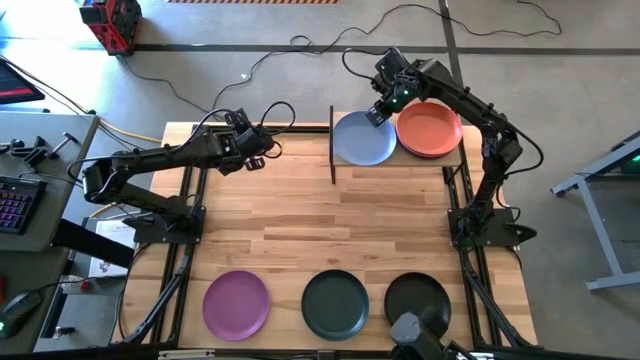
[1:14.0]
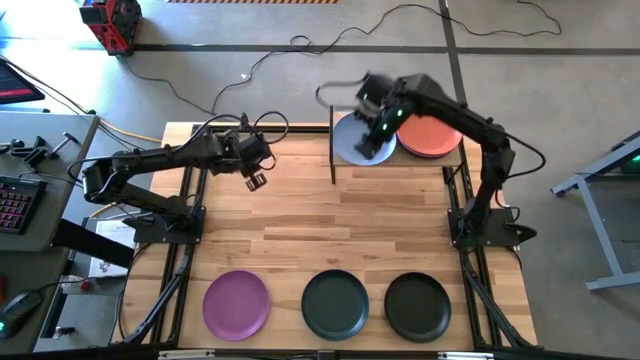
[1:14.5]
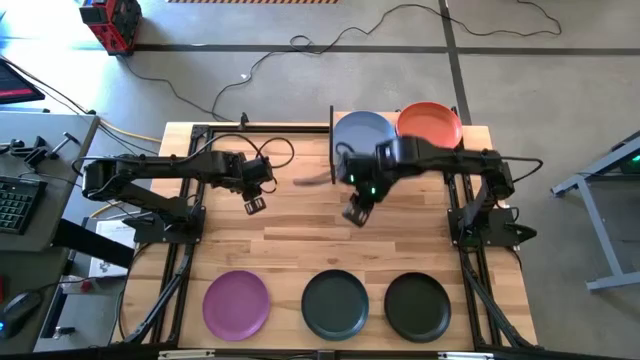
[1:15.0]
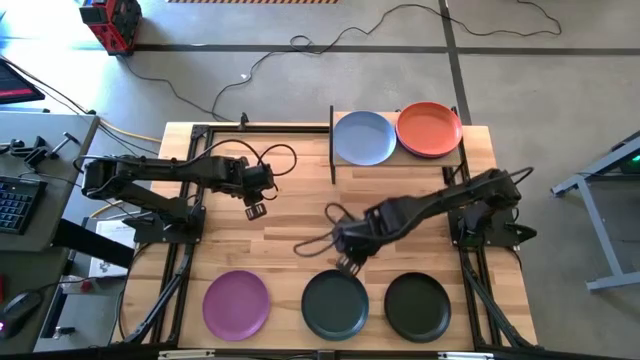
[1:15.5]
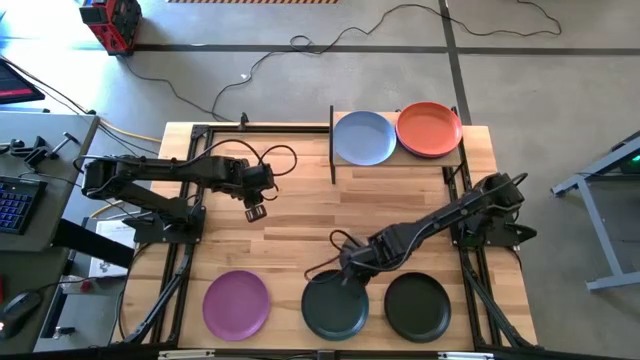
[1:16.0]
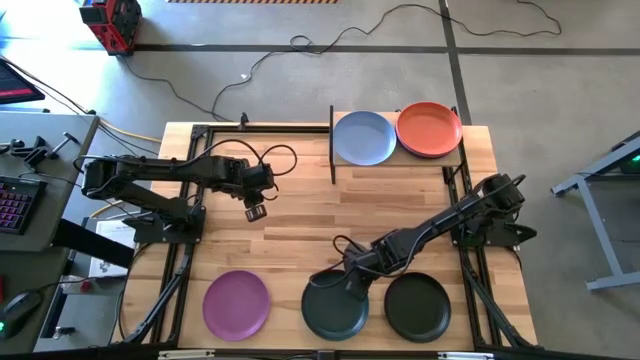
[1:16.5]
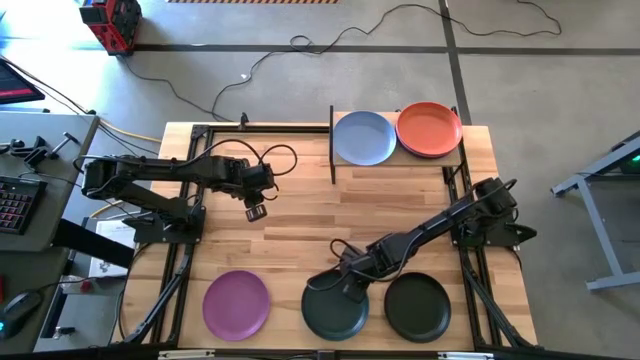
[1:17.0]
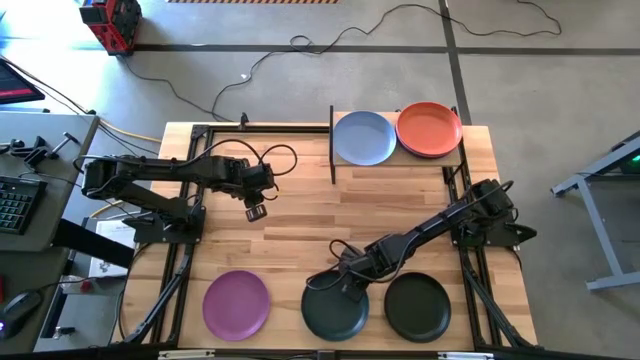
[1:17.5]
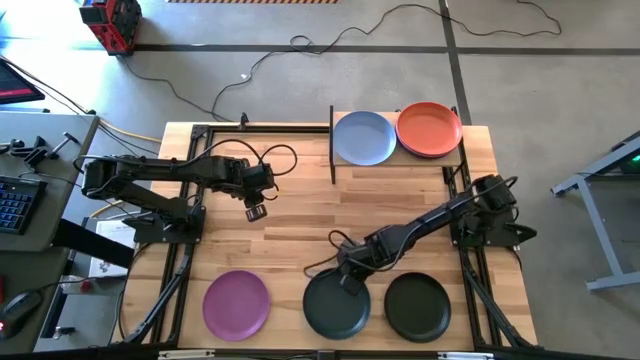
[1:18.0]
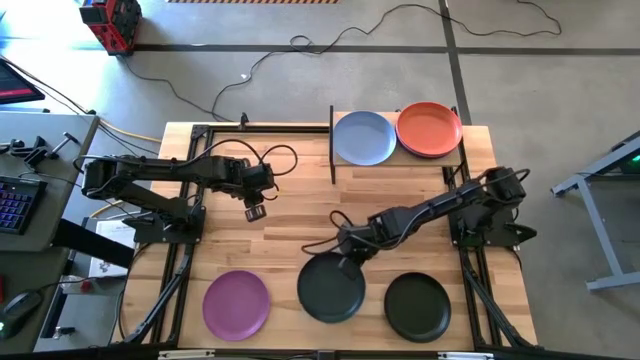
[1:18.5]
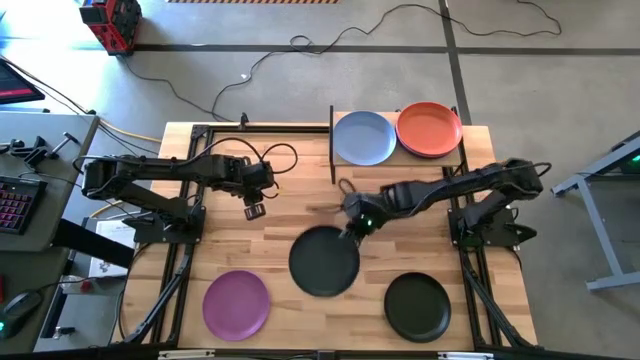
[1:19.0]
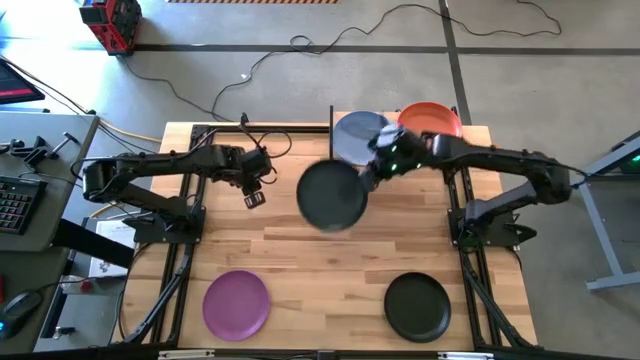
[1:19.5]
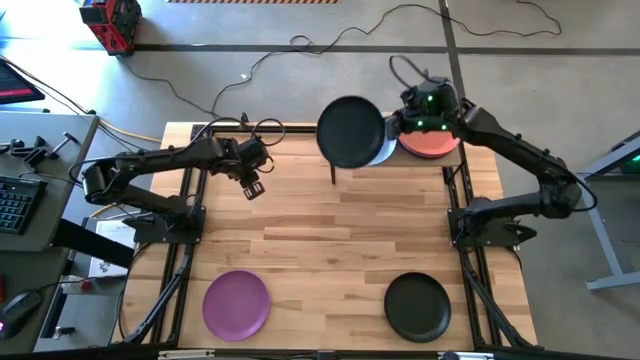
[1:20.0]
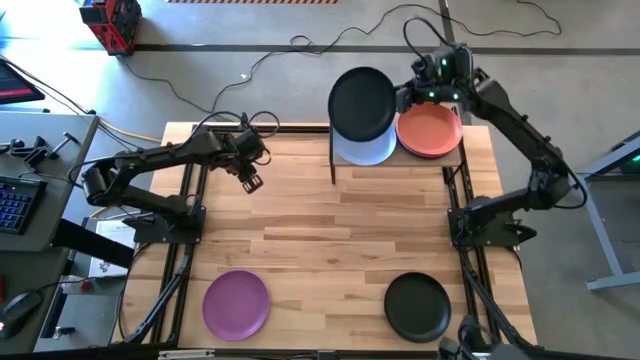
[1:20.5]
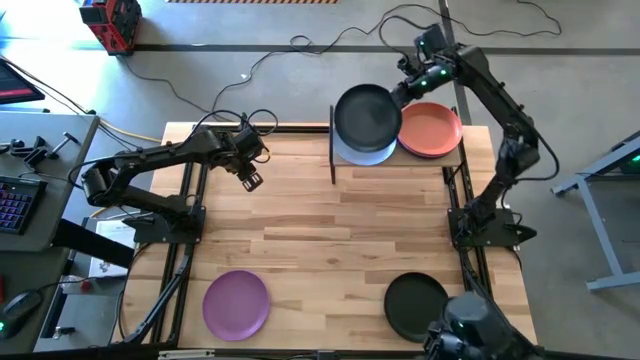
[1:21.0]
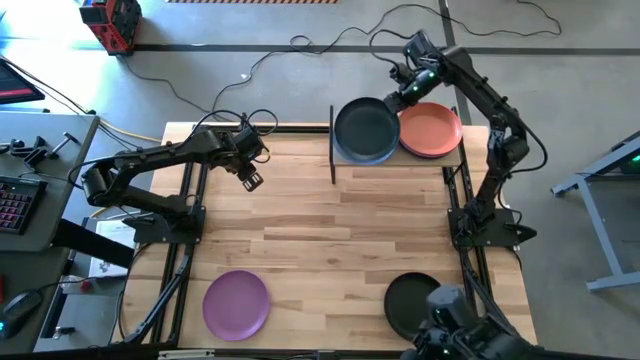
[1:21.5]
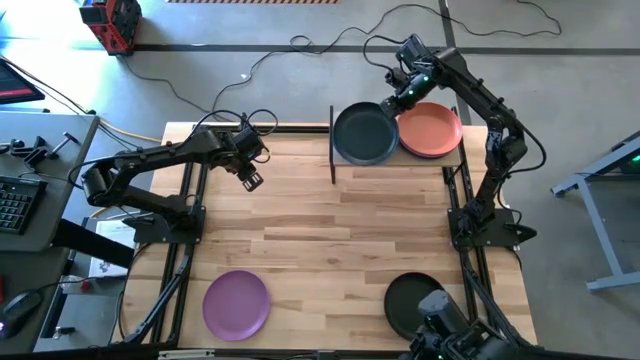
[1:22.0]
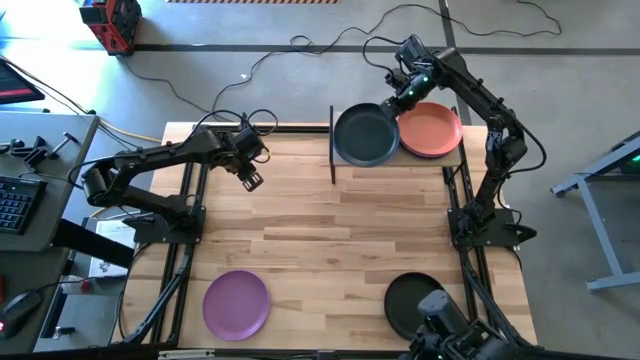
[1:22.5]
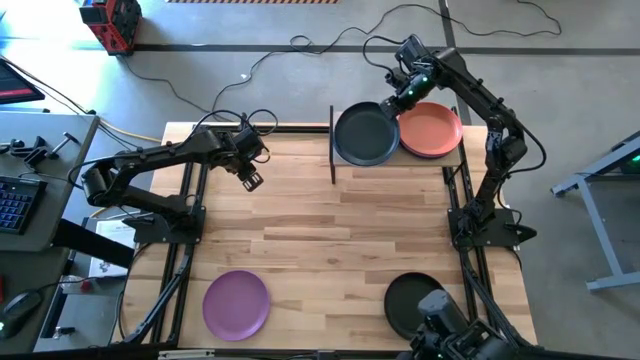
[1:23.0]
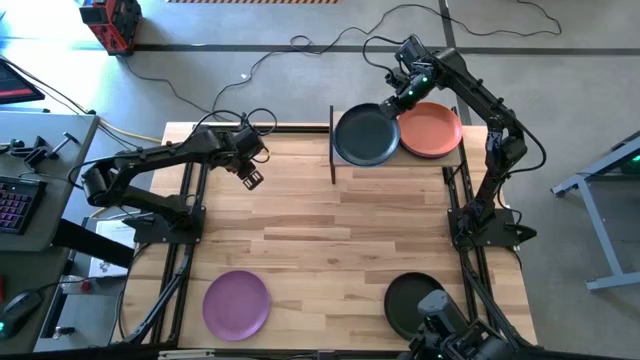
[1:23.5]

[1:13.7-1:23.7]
Task: Place and stack plates onto a shelf
Stack the dark blue plate on top of the blue plate on the shelf

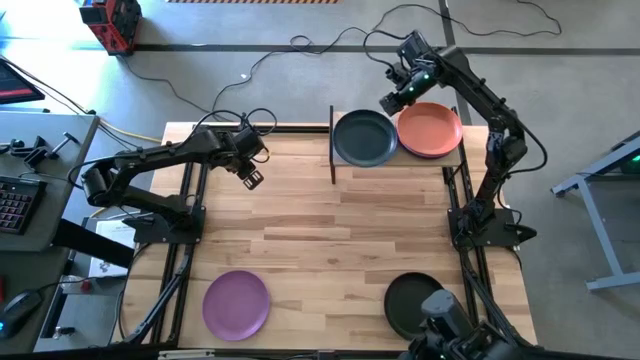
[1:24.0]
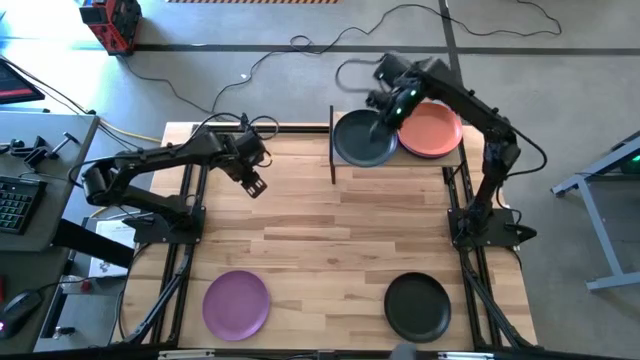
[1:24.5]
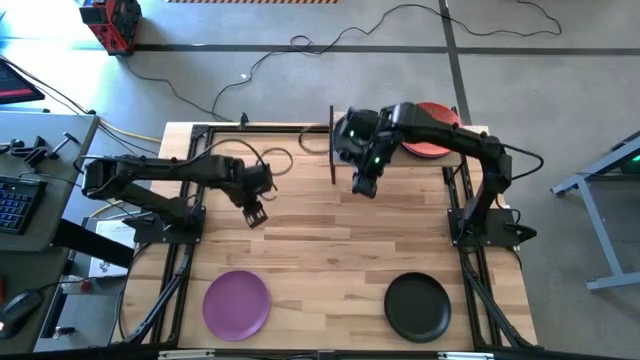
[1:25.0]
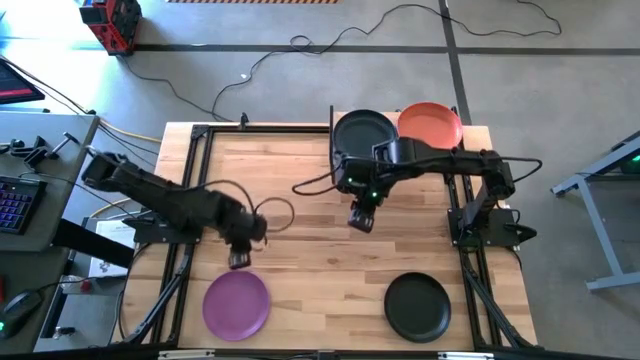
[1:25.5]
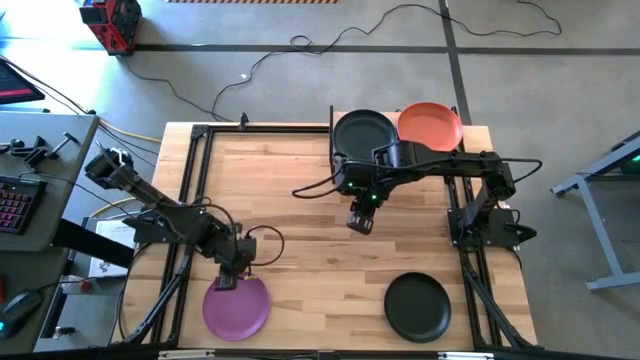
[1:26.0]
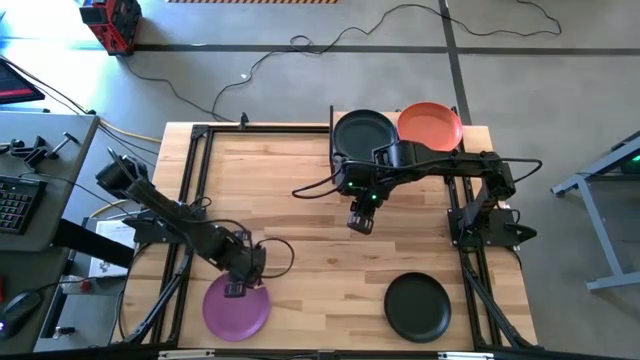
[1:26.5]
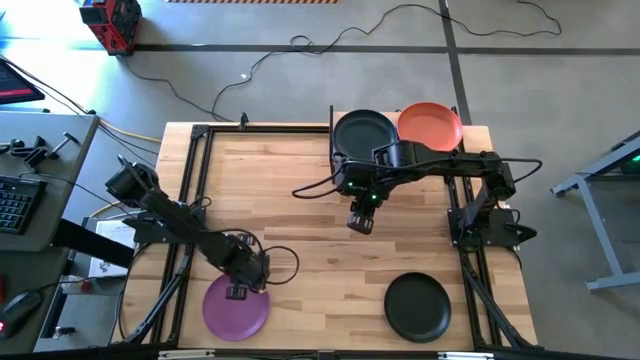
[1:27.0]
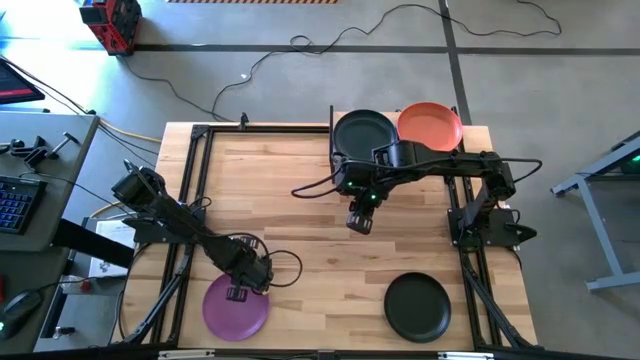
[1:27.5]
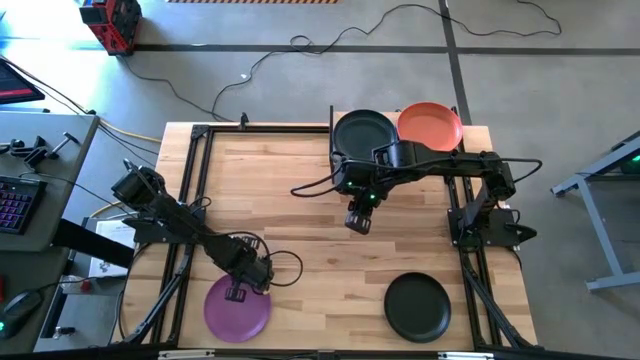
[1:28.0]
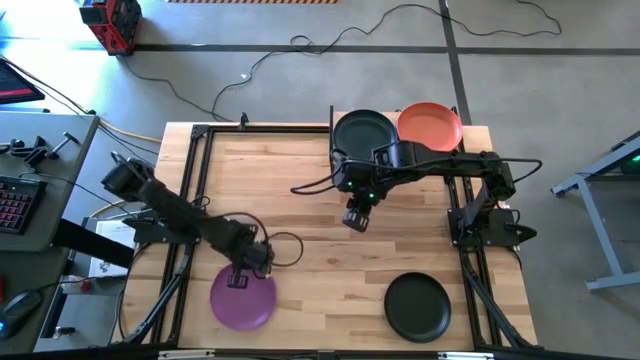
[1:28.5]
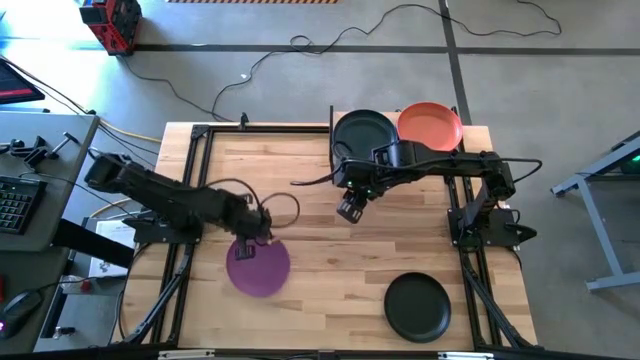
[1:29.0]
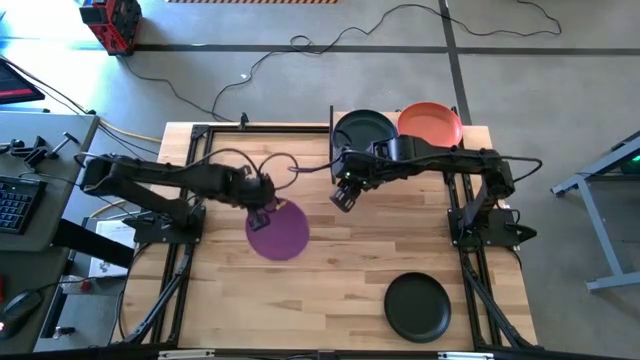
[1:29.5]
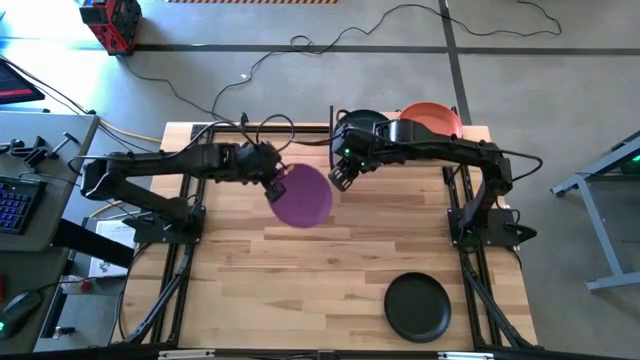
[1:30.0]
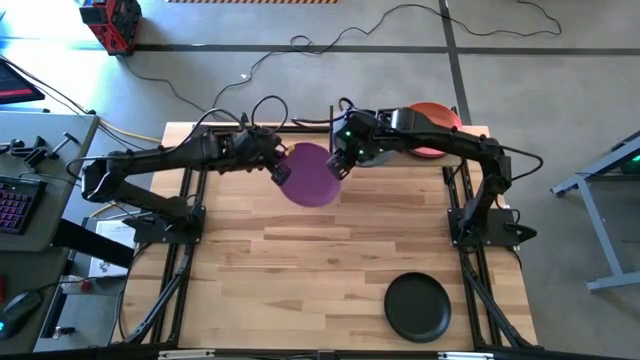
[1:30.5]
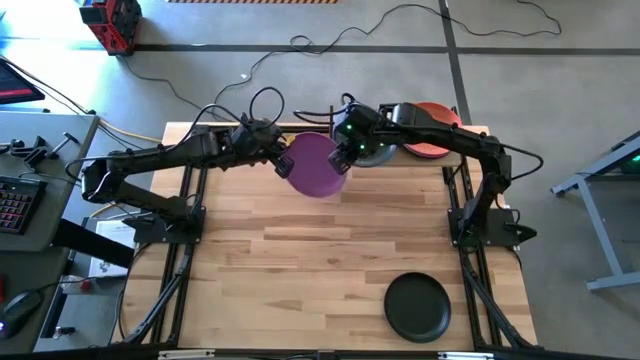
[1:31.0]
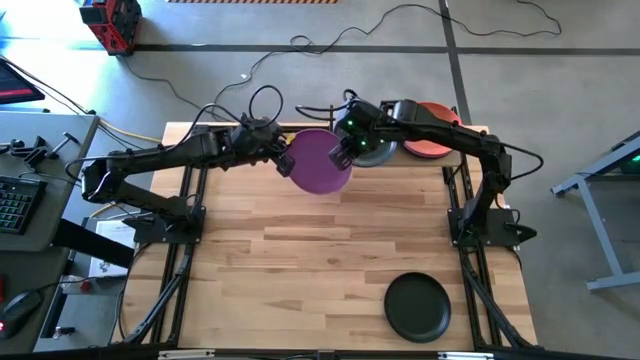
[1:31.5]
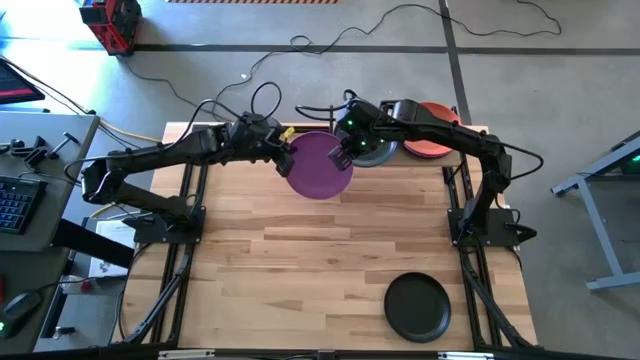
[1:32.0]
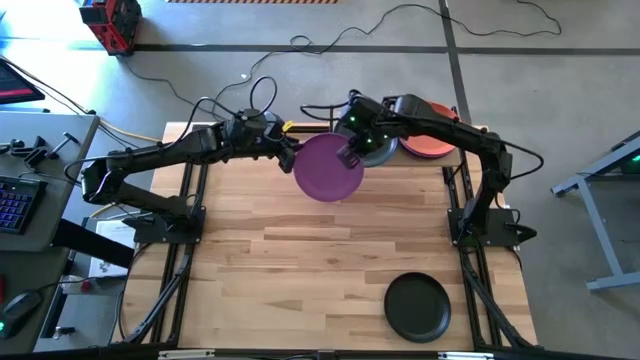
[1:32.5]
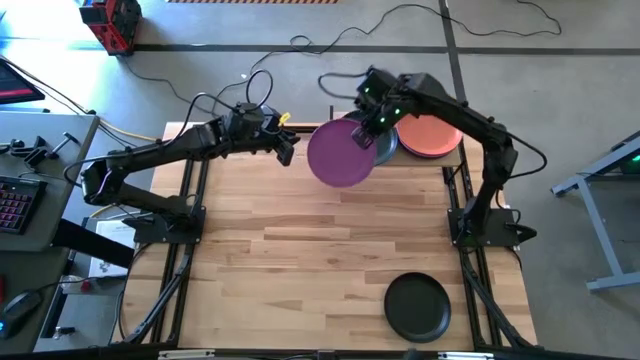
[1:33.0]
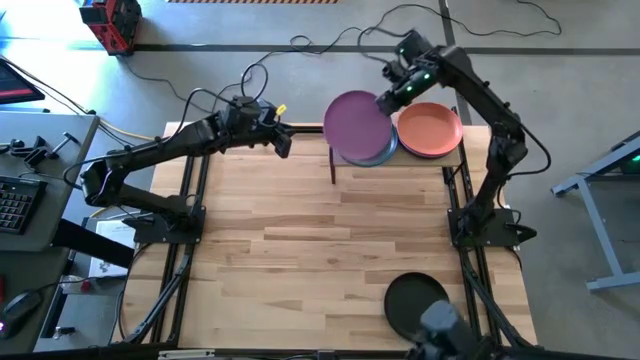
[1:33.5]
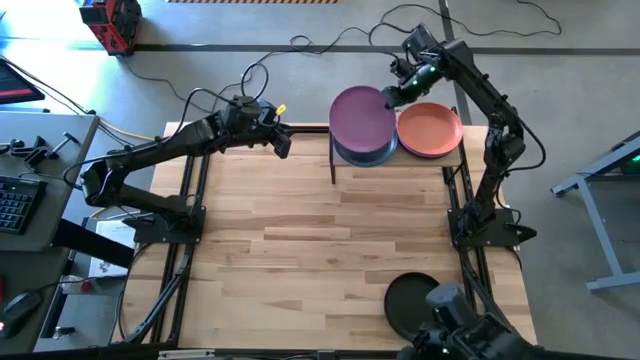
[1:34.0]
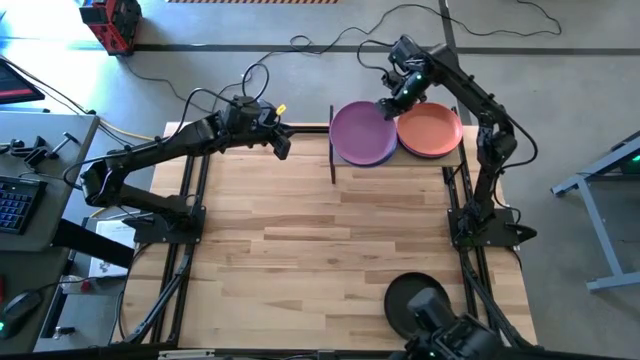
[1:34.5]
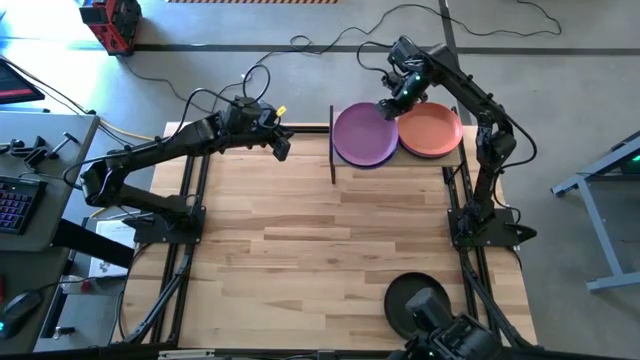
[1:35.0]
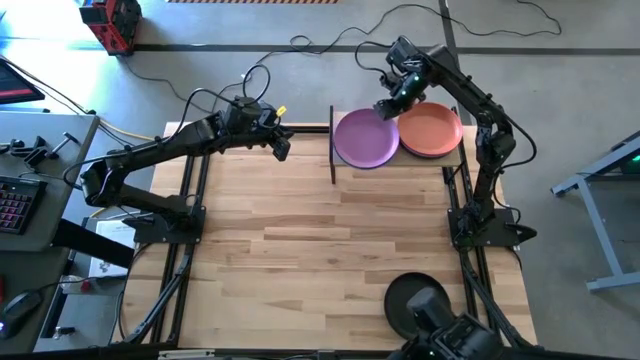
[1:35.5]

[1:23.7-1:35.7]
Stack the violet plate on top of the dark blue plate on the shelf

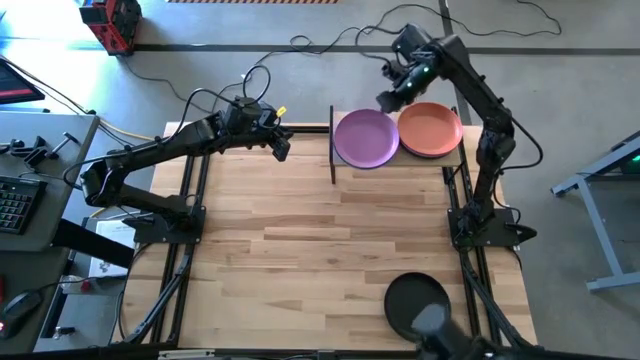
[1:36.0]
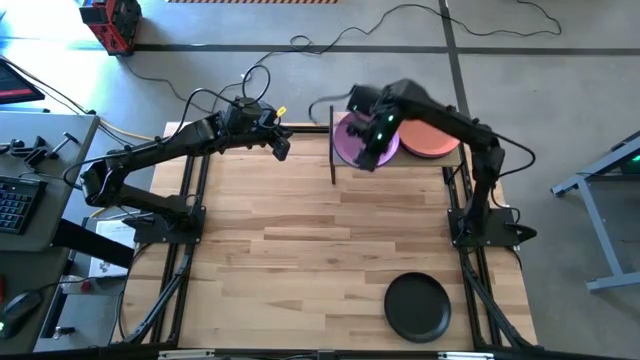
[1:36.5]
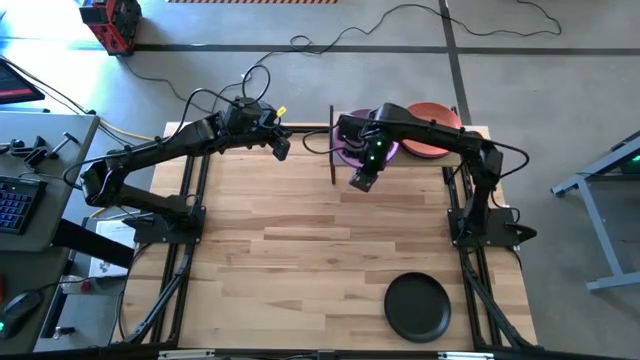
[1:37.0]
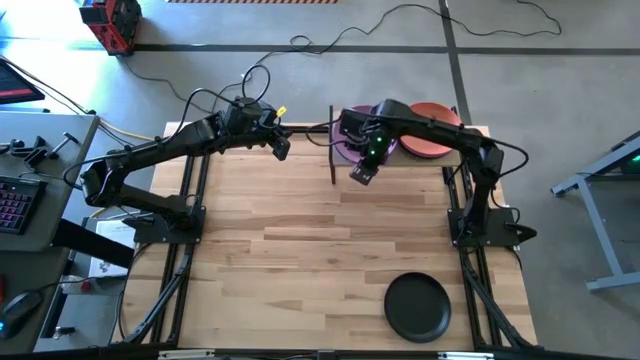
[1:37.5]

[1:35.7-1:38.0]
Adjust the stacked plates on the shelf
